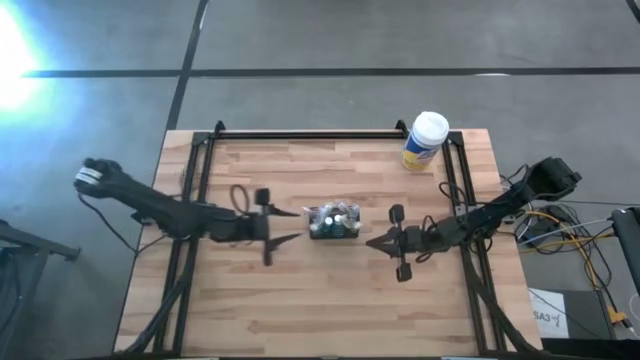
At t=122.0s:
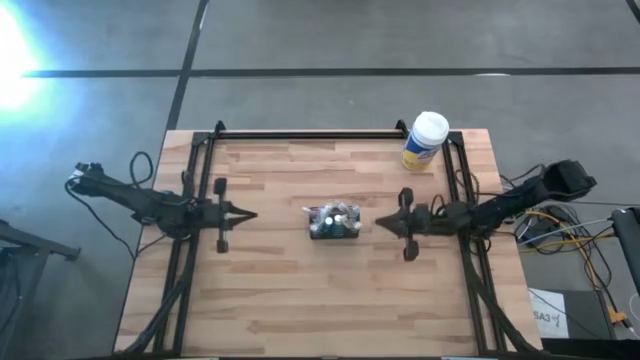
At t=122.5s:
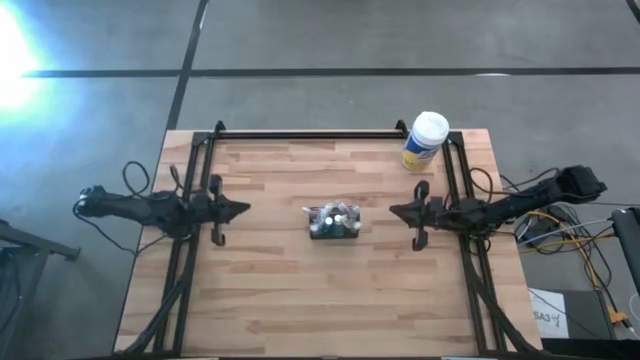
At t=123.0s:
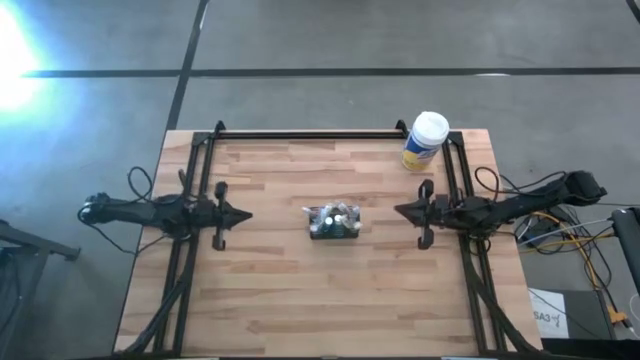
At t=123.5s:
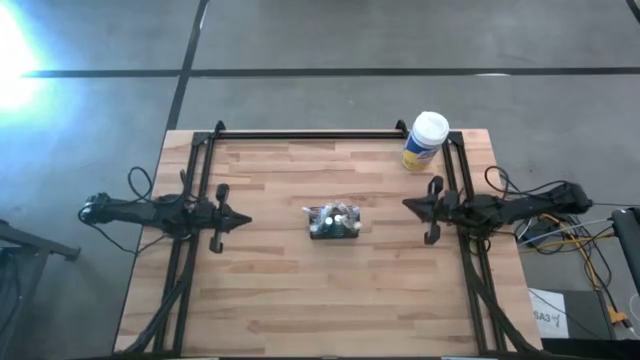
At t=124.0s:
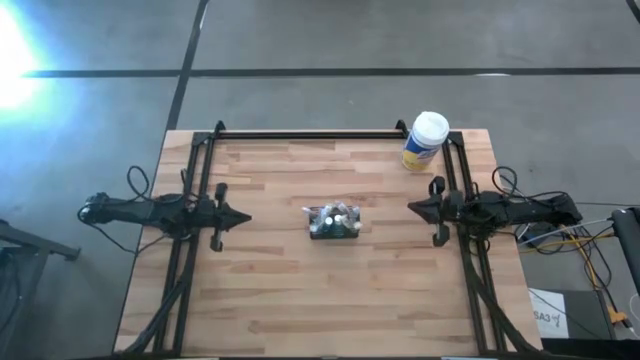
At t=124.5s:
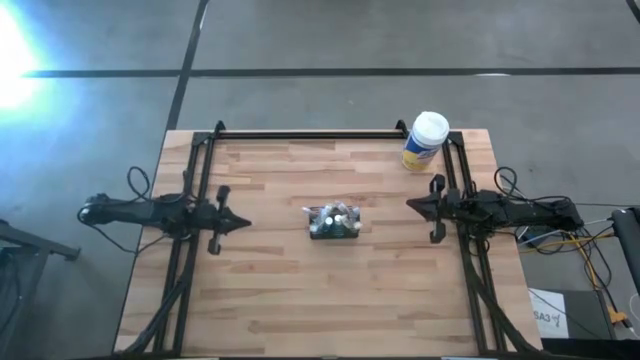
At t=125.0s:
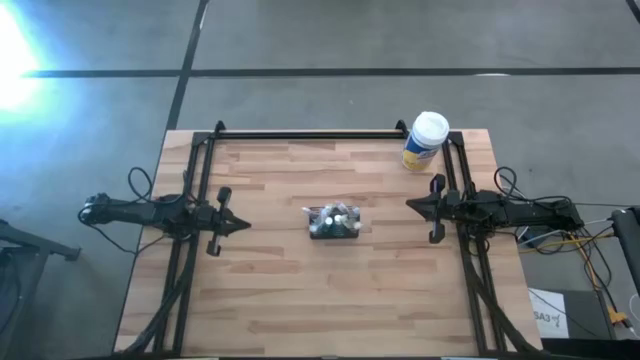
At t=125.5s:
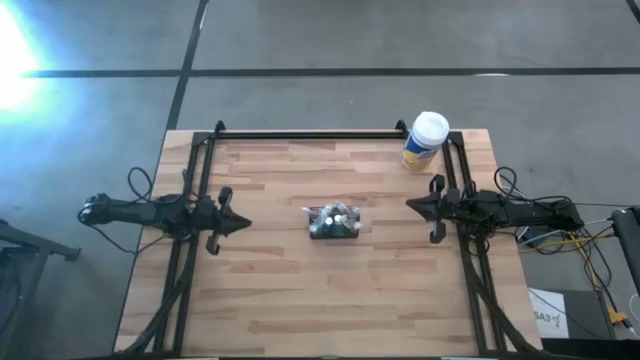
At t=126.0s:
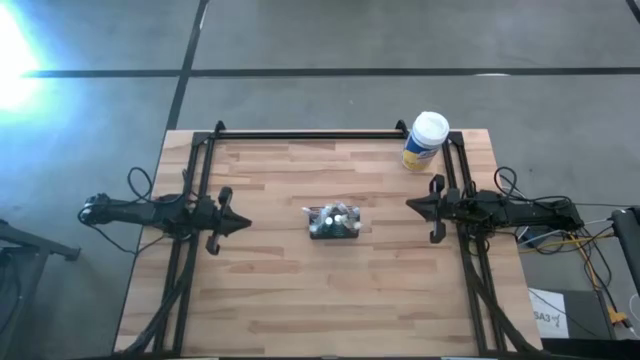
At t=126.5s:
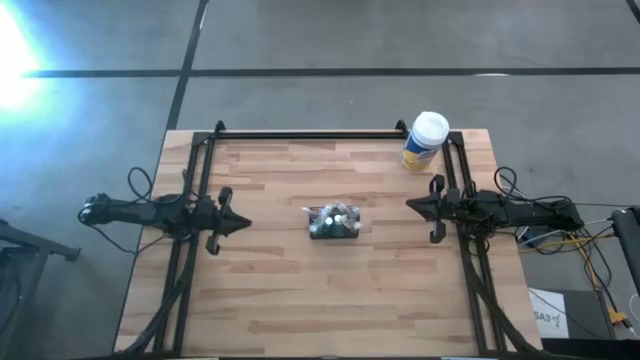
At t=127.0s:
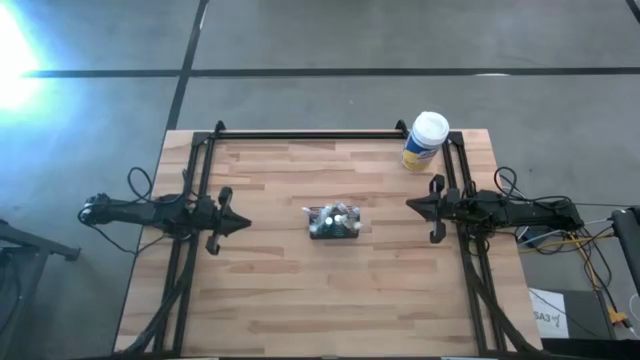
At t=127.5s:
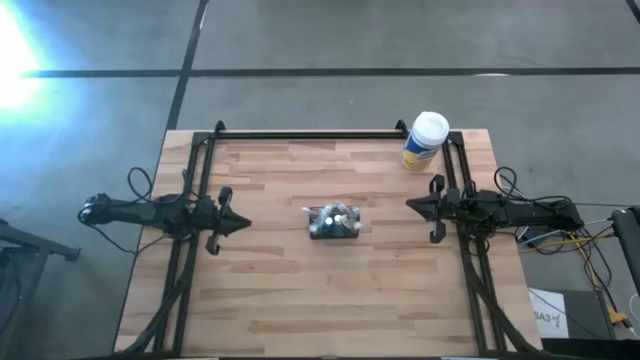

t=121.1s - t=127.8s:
Task: Pick & Place toothbrushing station
Return to Home Position

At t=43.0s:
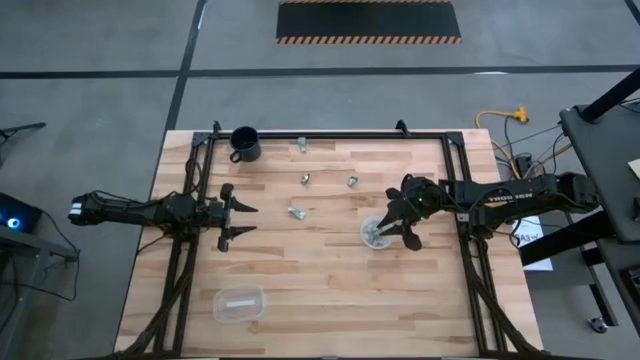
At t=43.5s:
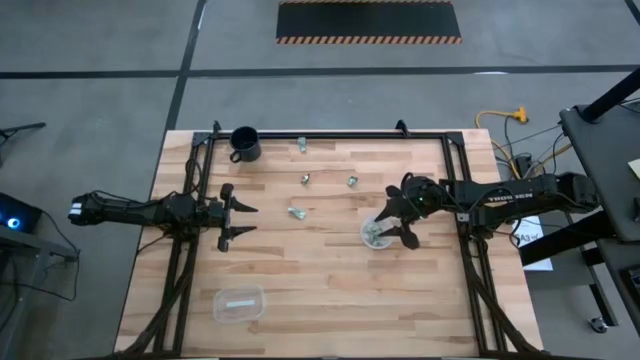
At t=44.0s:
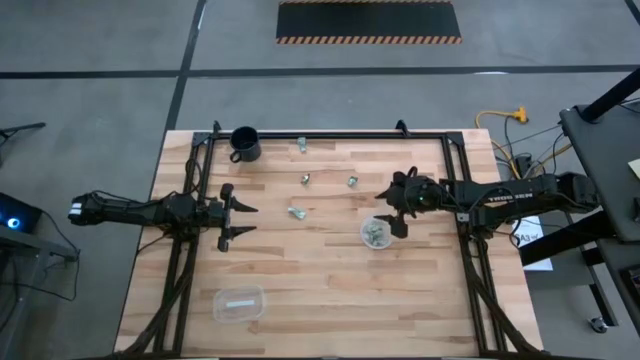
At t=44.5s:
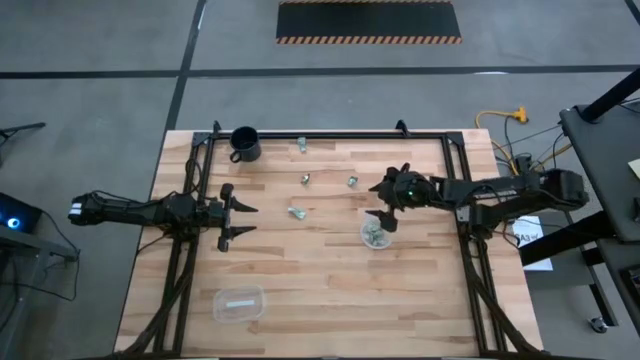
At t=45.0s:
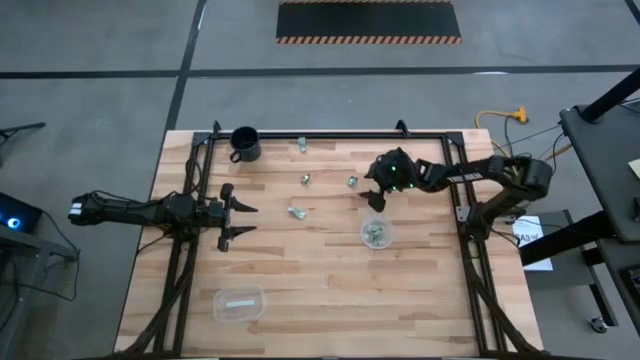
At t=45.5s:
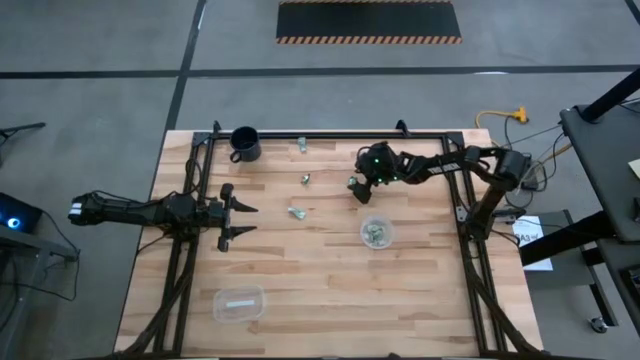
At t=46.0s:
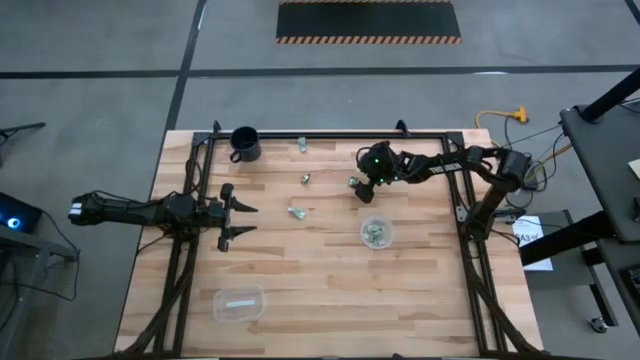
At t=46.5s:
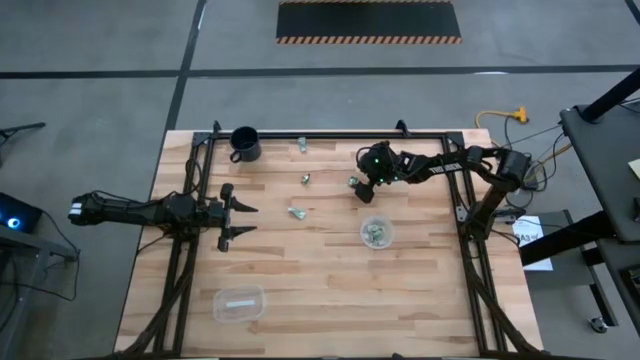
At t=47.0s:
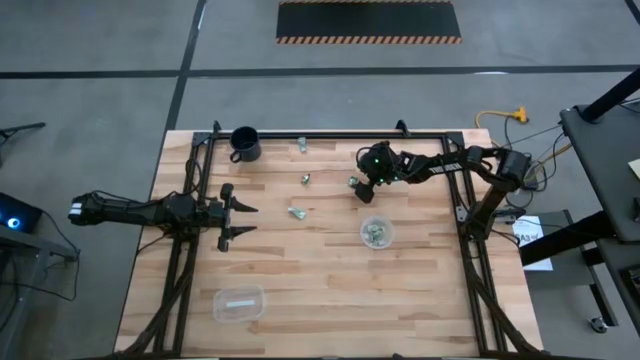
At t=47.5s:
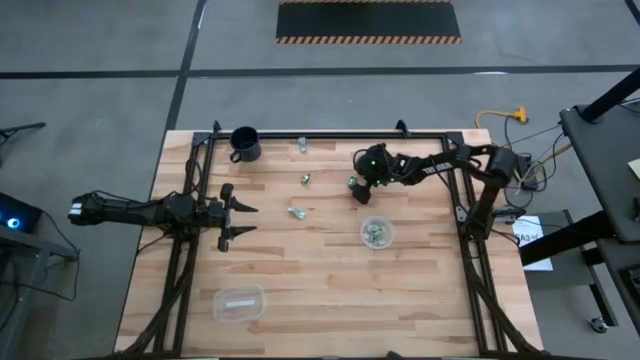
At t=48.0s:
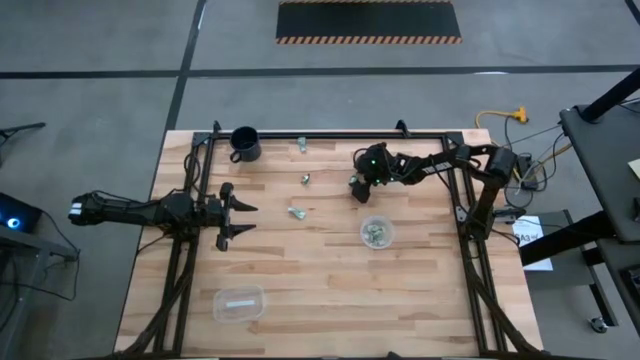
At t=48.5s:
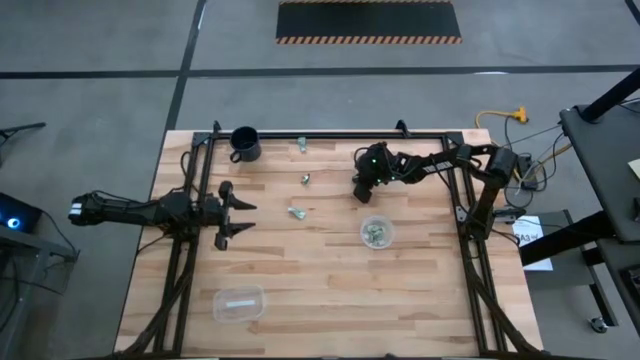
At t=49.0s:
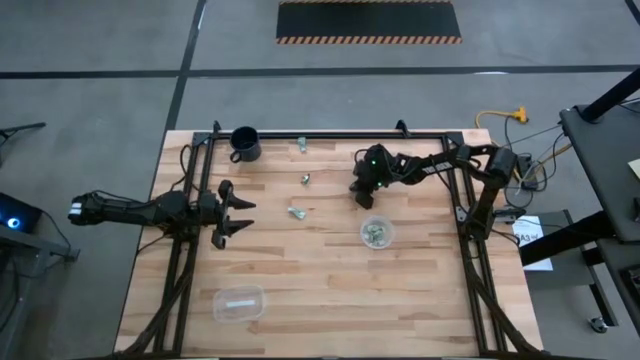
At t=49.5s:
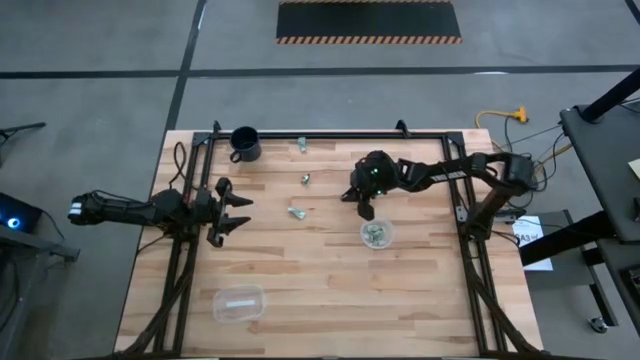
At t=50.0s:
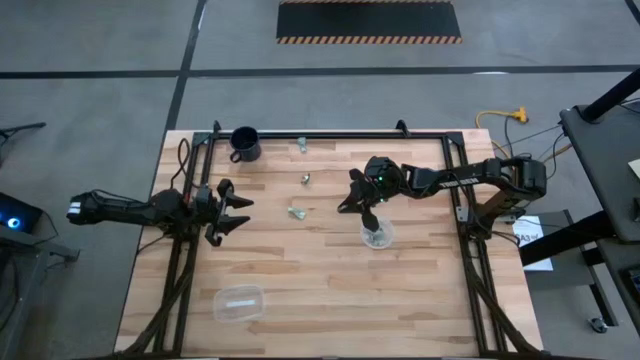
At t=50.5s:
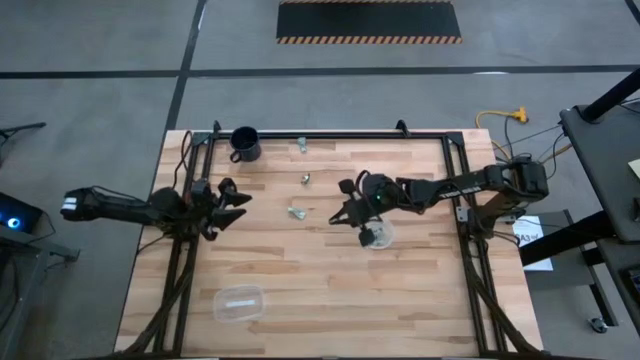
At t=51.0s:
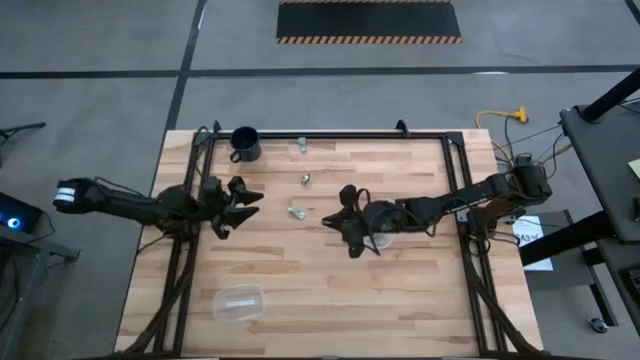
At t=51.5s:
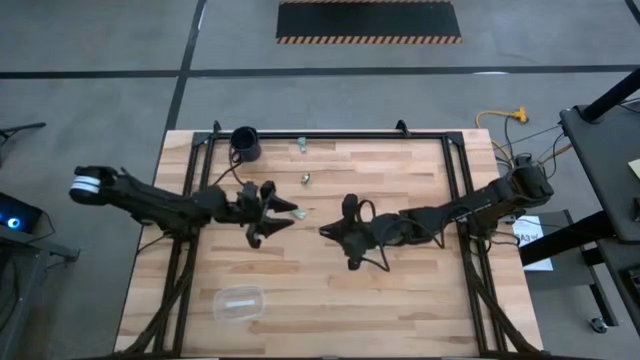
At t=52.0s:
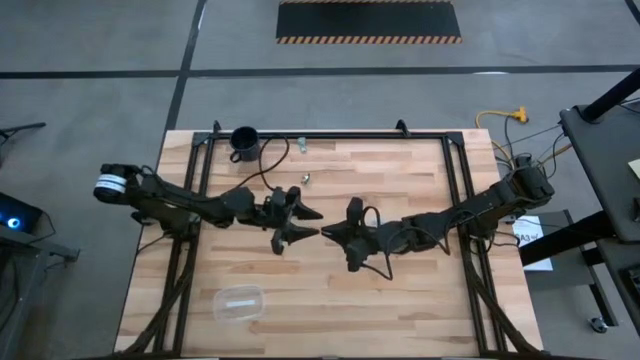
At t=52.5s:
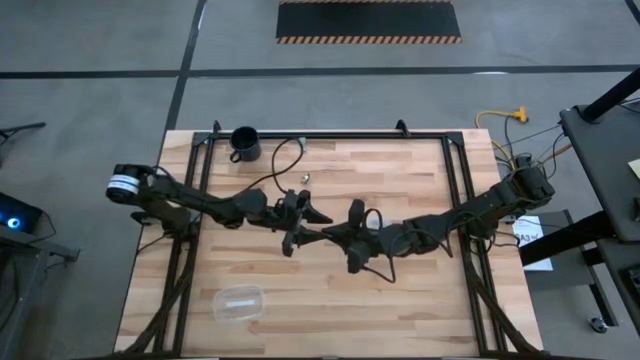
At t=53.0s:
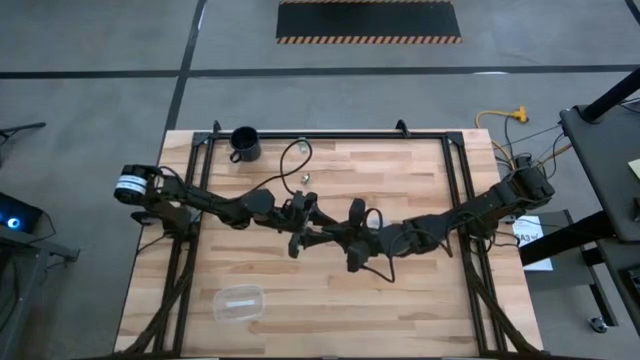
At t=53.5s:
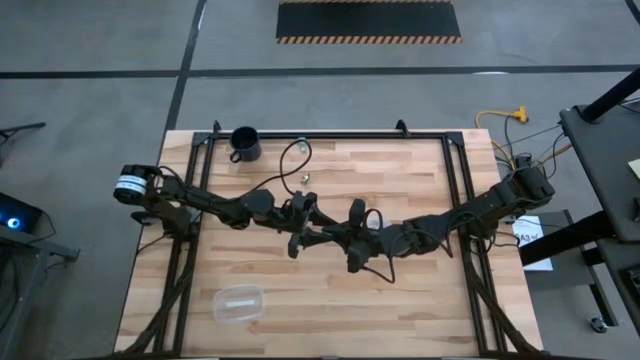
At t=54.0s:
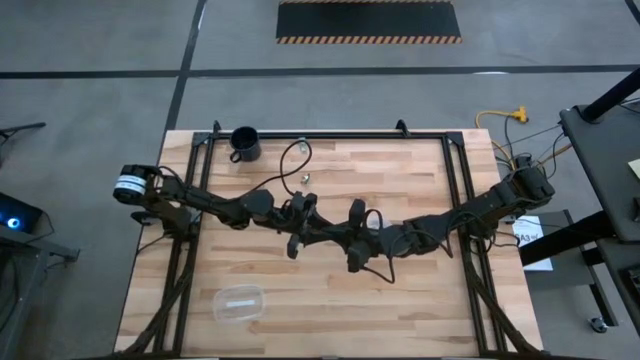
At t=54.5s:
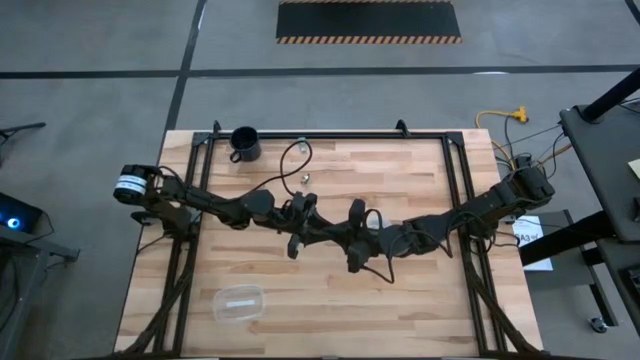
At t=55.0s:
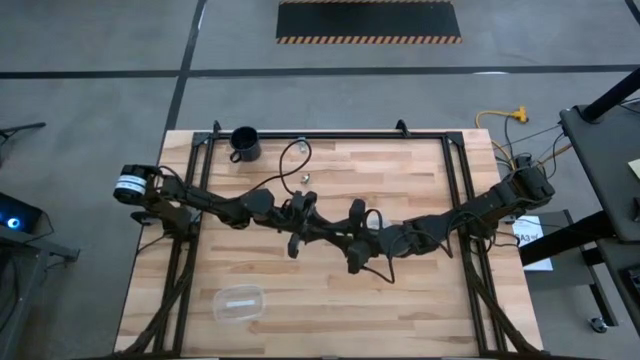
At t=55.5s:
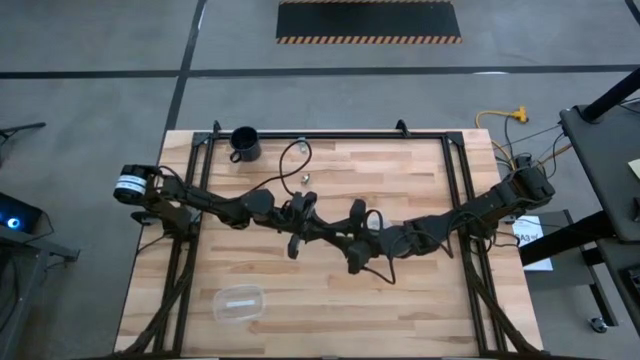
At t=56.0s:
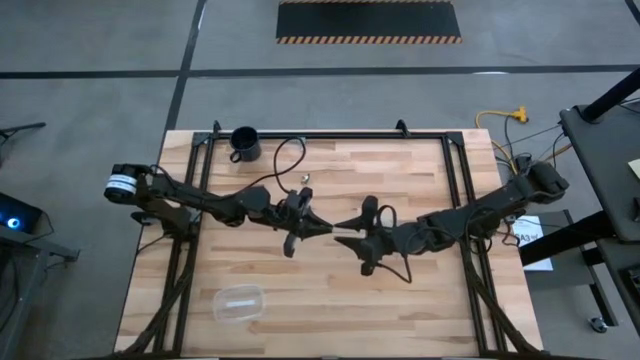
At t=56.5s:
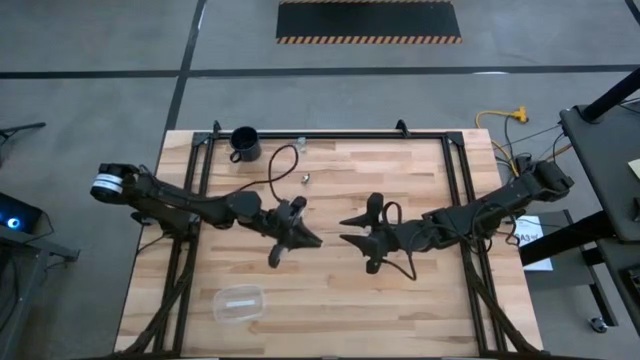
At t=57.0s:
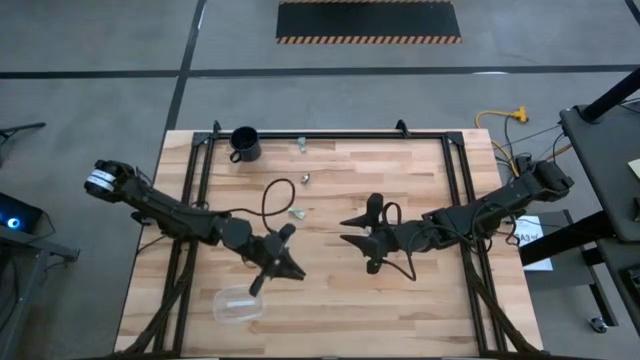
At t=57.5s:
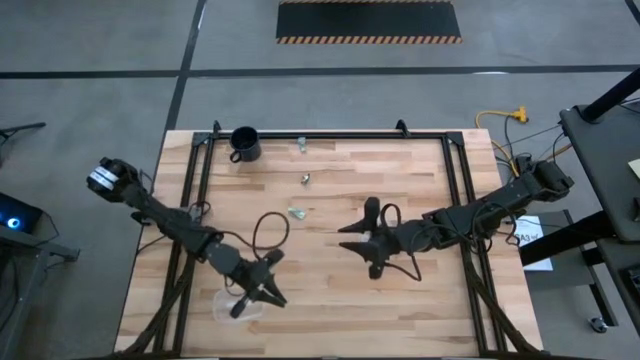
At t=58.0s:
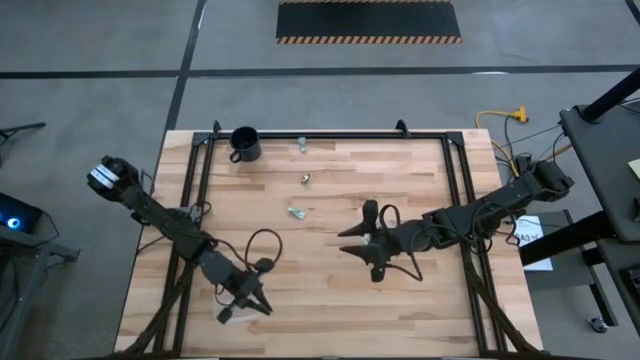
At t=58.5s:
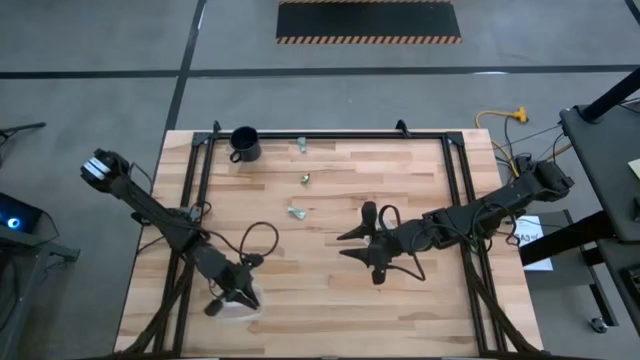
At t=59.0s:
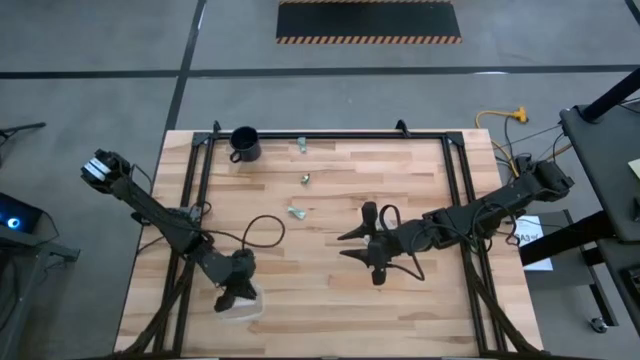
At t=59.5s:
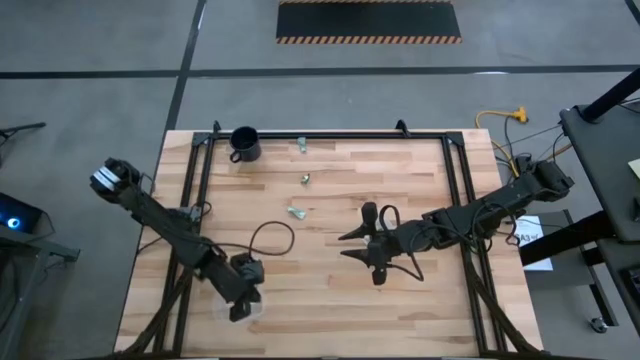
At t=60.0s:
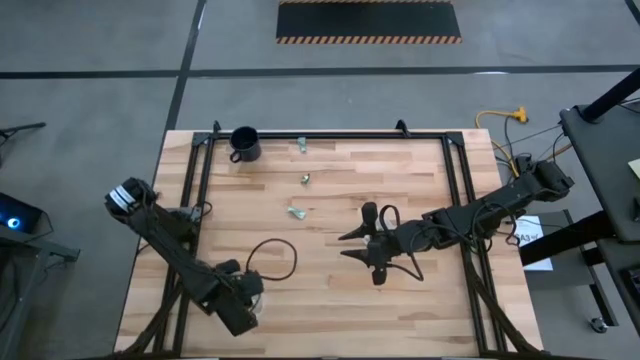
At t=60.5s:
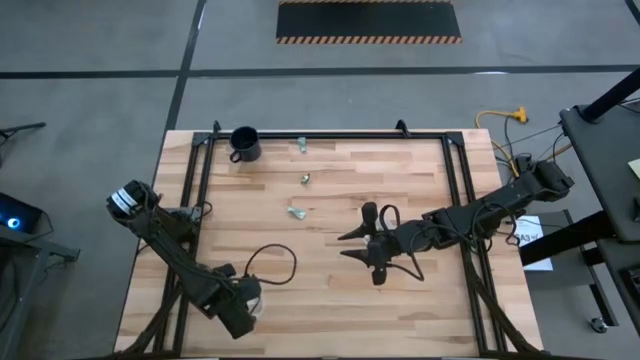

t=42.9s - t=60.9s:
Task: Pick and place Stevia / Truvia into bins
Put the green truvia packet into the left transparent container
